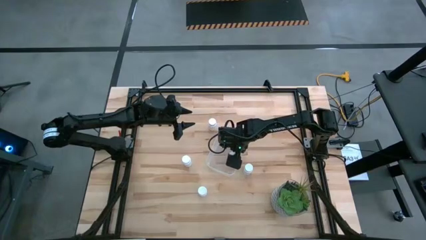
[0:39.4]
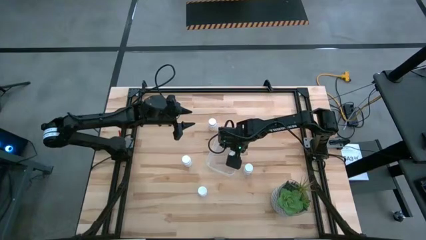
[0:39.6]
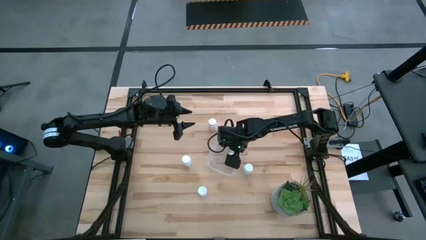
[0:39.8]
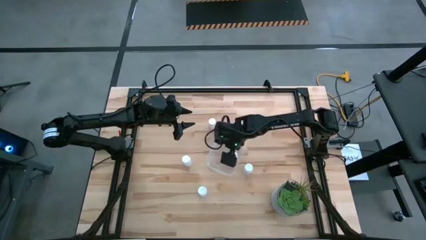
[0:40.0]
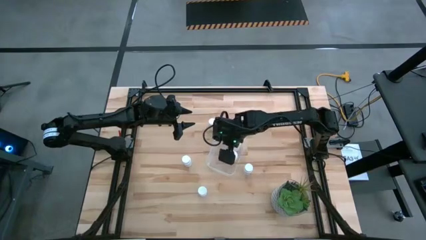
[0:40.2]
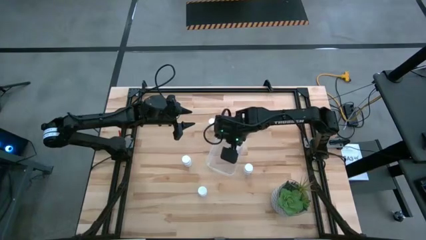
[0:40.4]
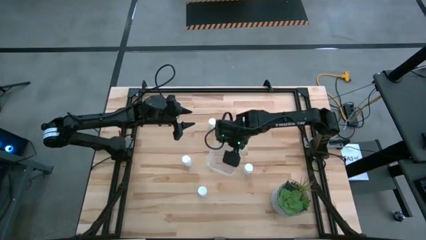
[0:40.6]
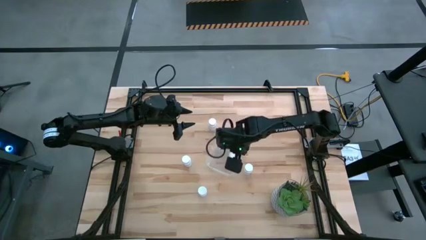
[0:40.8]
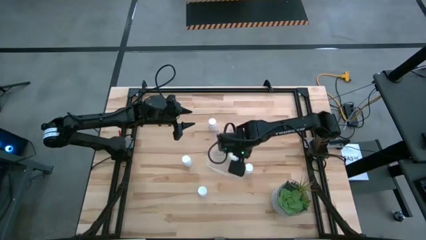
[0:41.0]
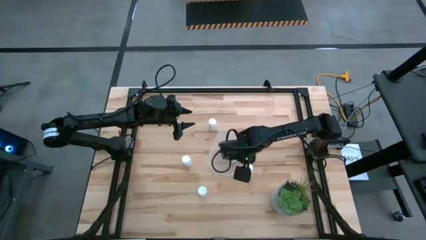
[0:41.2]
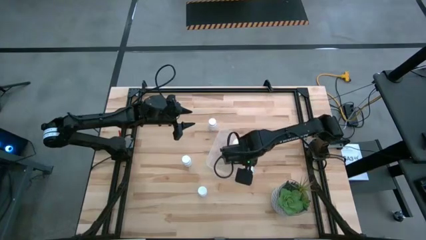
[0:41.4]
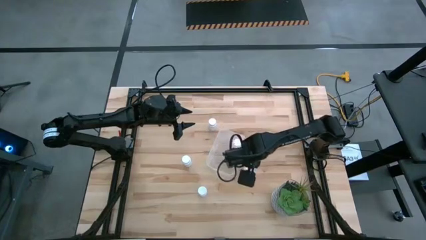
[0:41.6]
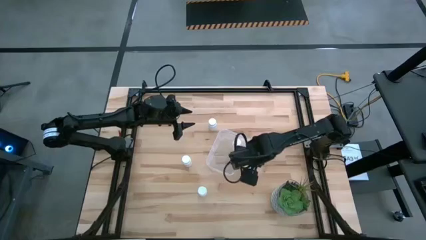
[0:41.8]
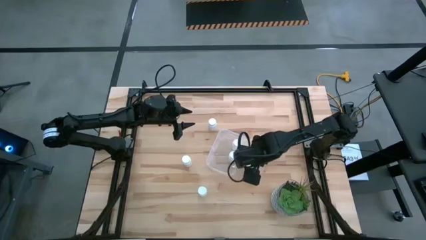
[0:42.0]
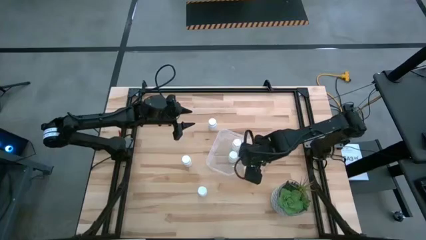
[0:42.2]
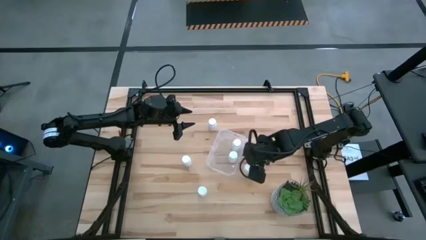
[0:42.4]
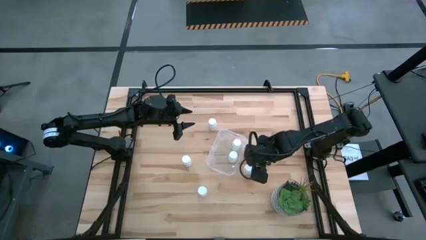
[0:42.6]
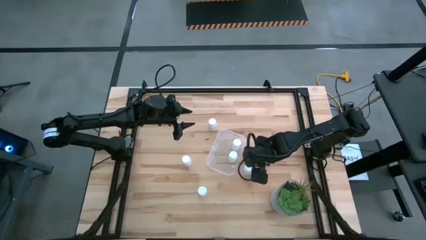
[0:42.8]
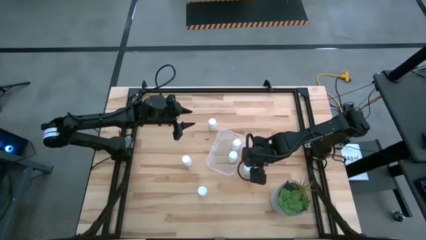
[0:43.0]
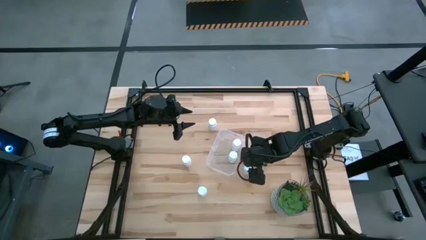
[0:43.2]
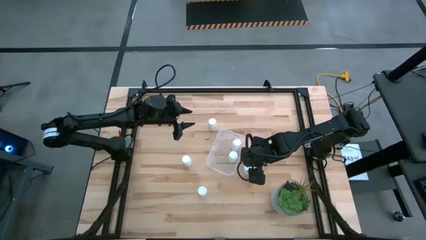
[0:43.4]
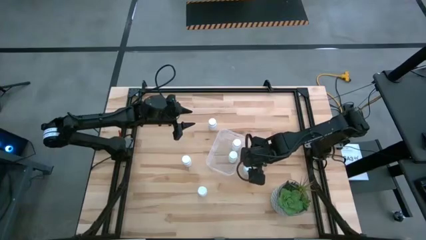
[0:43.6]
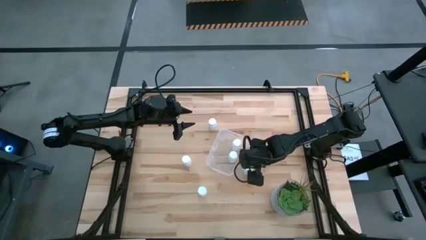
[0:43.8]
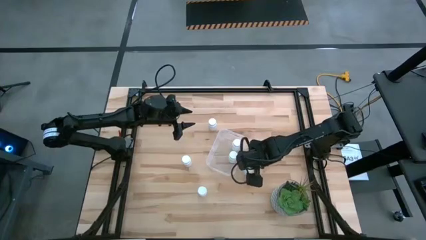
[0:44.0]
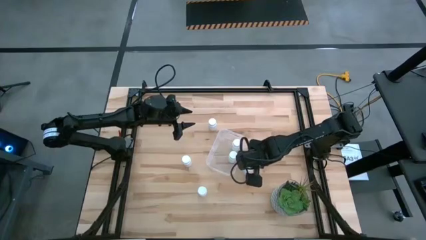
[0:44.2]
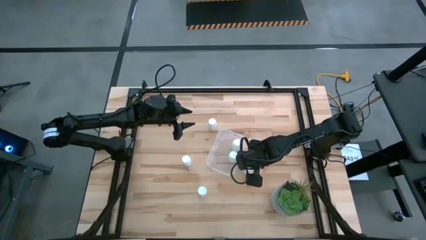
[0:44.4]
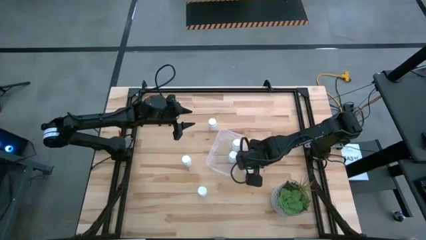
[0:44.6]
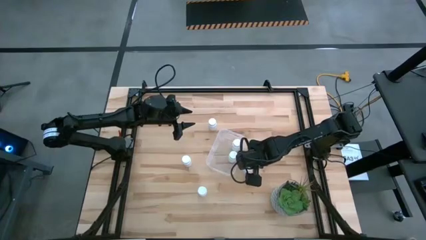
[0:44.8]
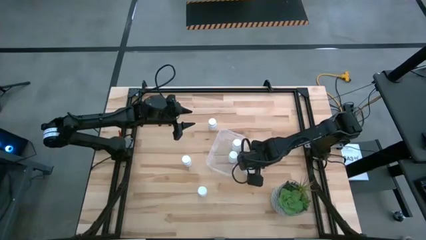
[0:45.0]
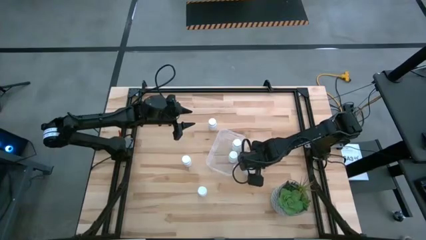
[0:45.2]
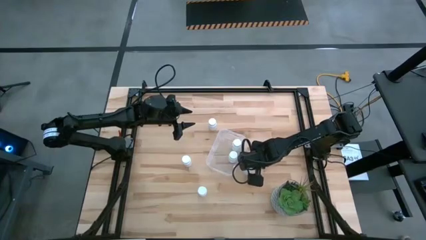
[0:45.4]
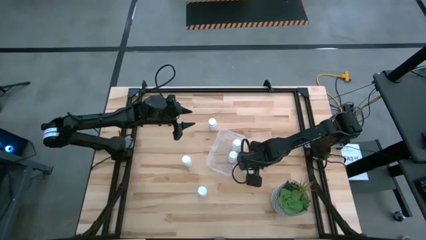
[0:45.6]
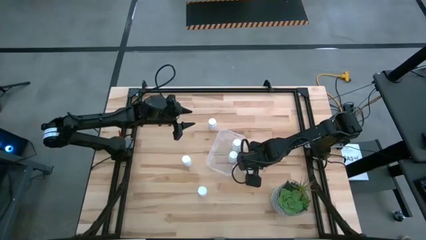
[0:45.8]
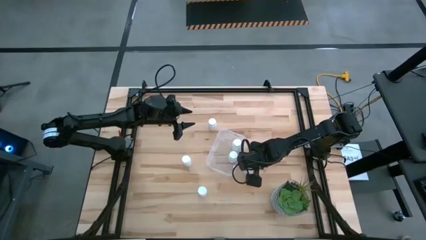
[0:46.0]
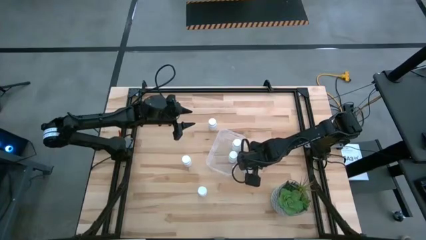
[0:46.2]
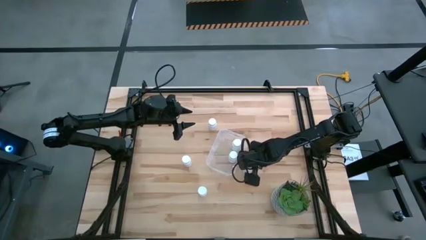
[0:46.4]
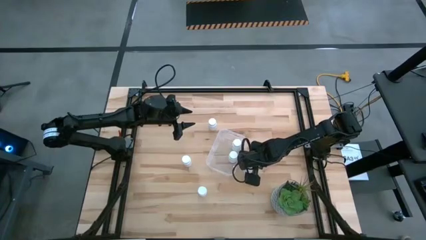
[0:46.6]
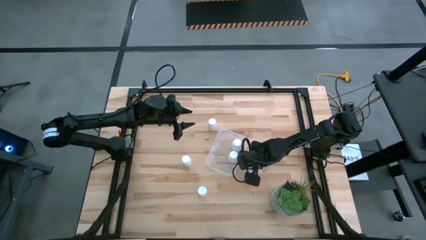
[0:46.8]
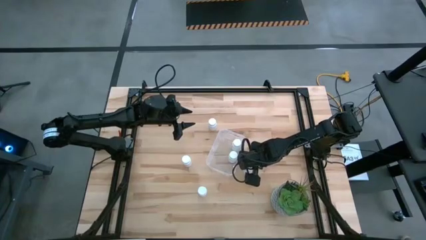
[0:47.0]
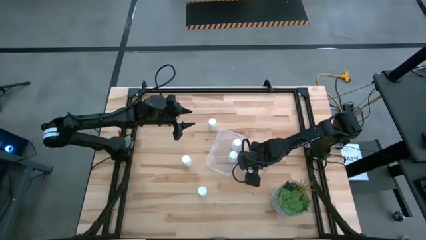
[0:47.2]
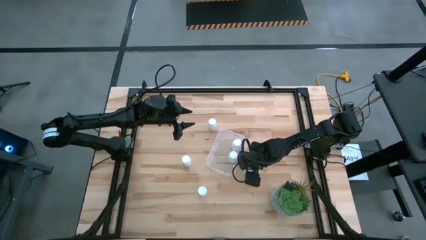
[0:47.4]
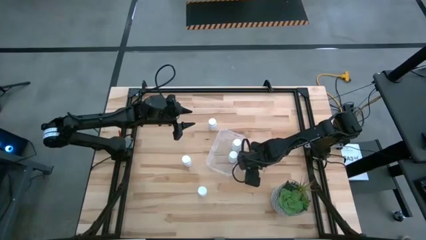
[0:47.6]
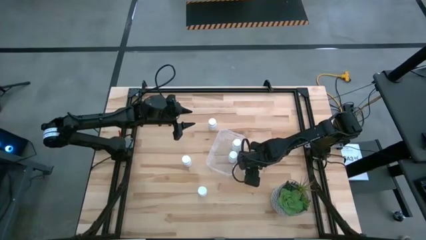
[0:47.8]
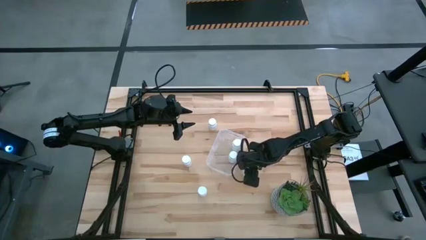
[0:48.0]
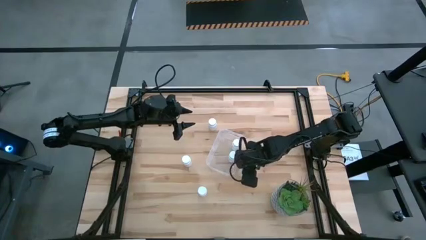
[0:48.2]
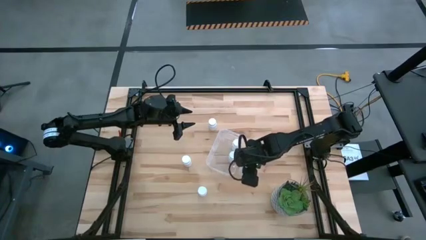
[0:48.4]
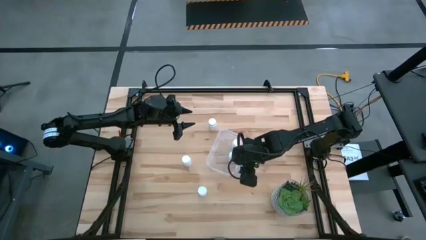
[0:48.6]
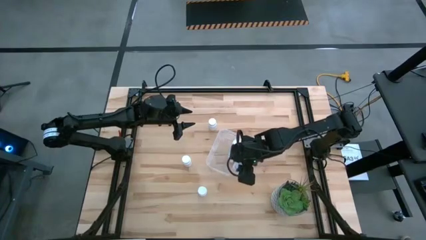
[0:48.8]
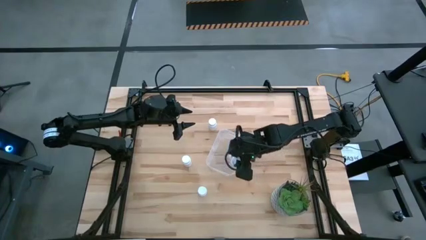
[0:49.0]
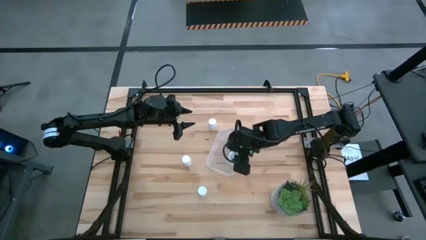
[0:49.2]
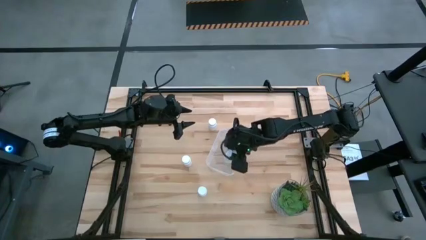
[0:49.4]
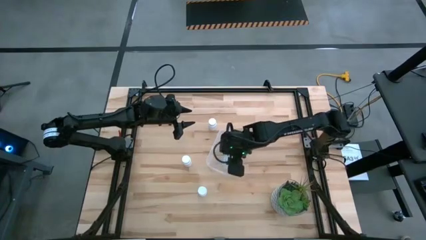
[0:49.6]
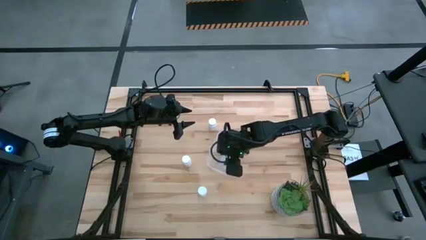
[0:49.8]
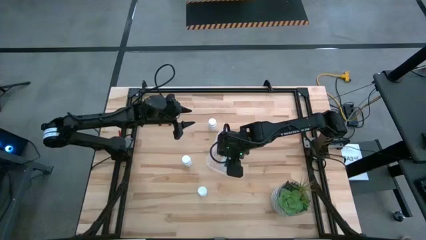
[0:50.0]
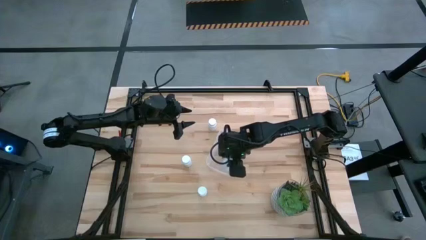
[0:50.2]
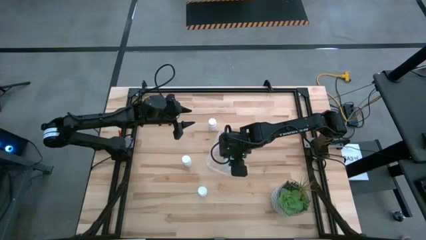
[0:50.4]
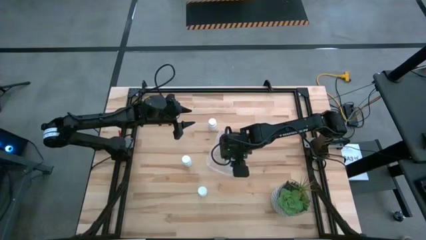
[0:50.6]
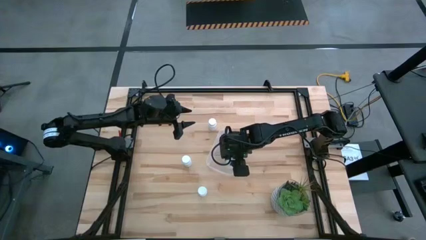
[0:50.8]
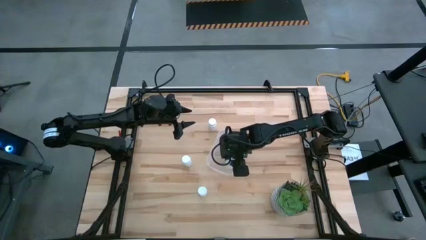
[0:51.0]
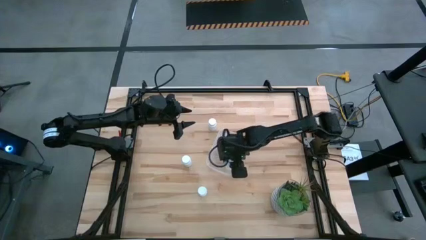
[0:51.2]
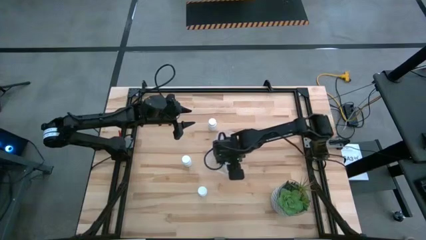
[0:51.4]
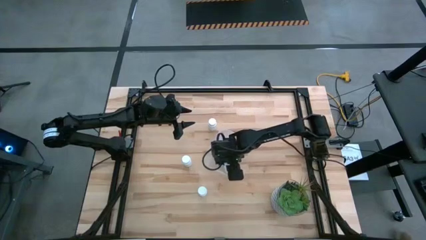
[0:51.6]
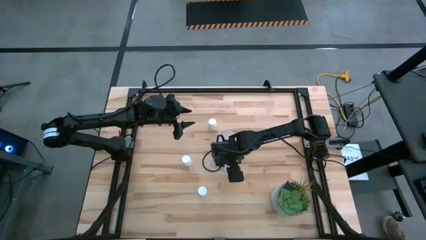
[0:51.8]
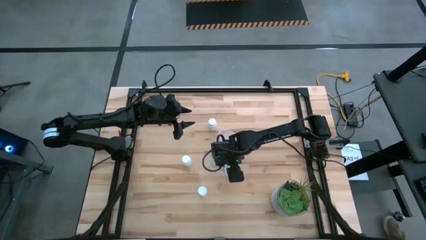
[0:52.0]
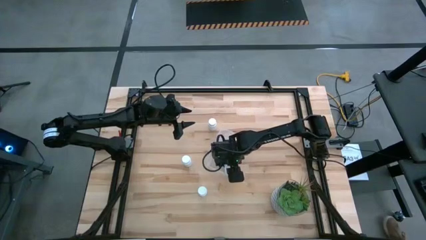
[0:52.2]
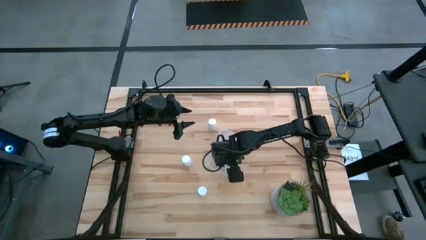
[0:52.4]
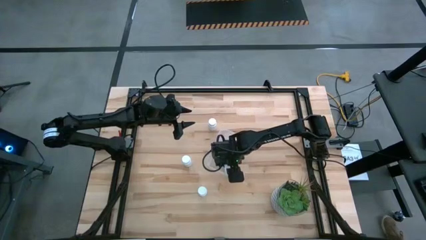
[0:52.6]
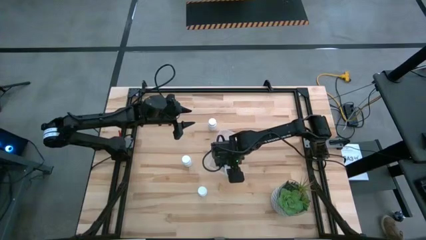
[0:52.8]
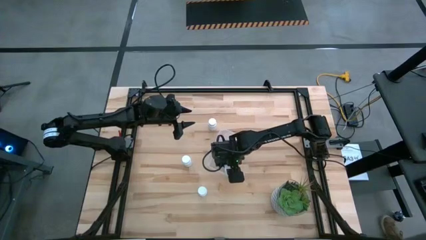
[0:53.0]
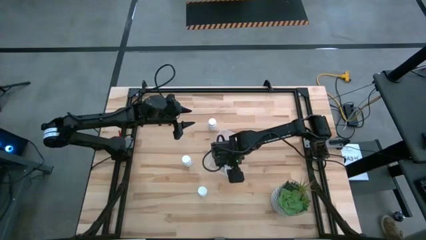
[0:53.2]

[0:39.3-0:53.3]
Task: Pick and place pill bottles into a basket
Put the medicine bottle into the transparent bin

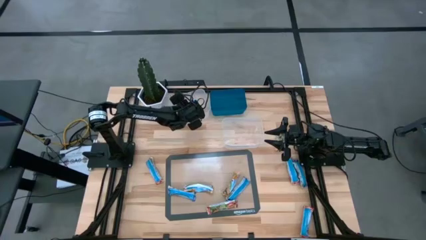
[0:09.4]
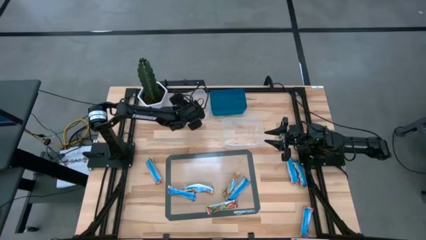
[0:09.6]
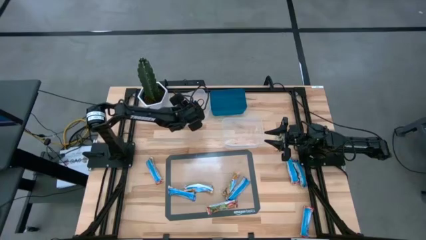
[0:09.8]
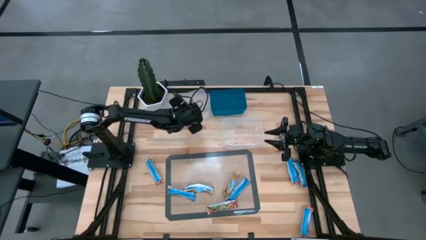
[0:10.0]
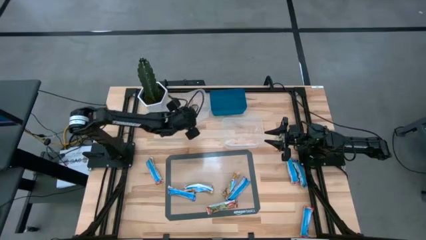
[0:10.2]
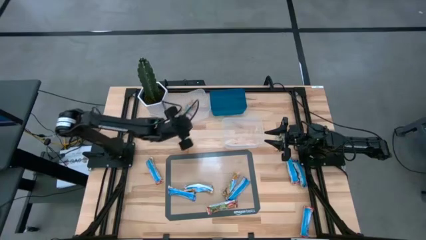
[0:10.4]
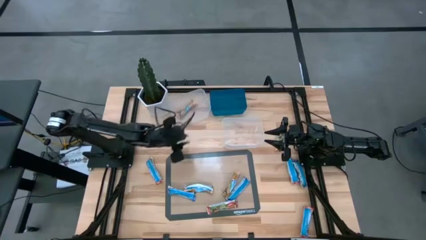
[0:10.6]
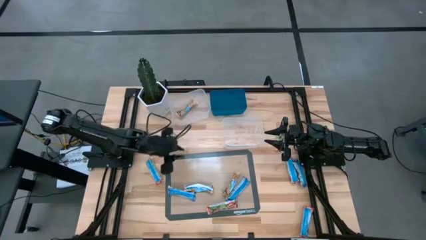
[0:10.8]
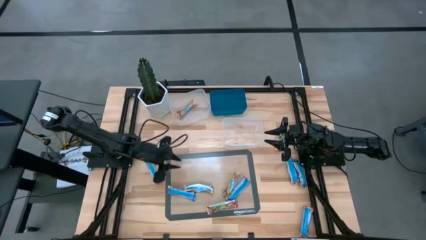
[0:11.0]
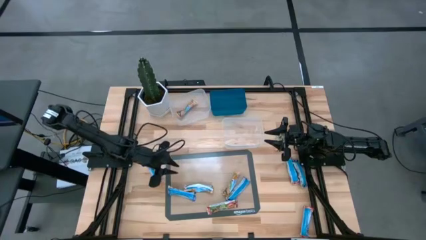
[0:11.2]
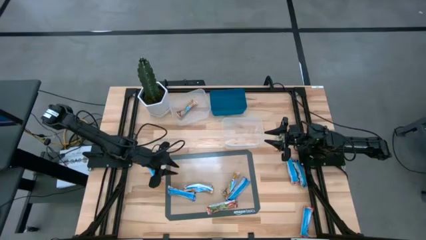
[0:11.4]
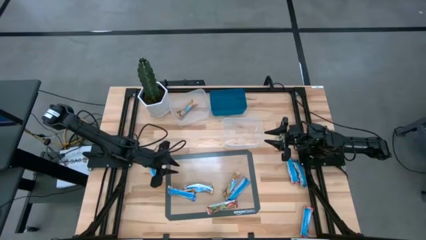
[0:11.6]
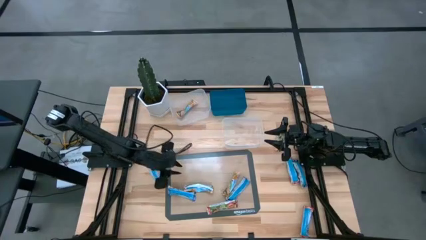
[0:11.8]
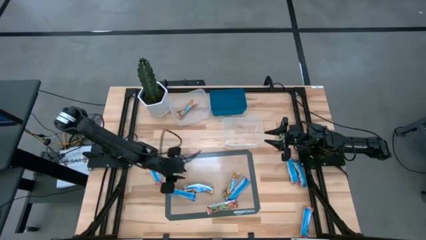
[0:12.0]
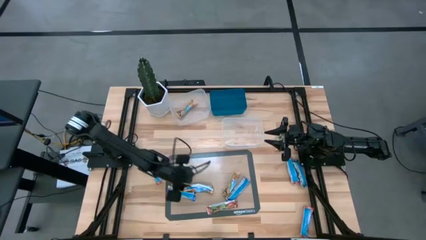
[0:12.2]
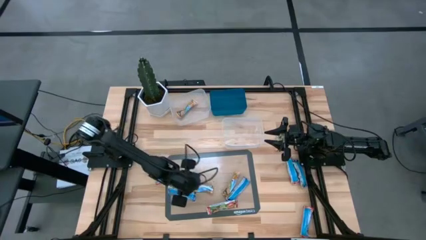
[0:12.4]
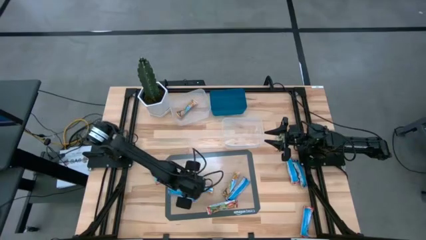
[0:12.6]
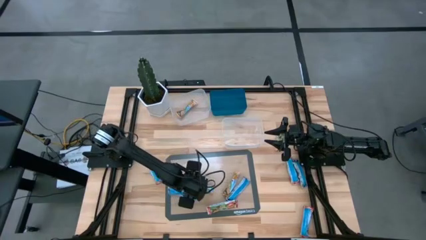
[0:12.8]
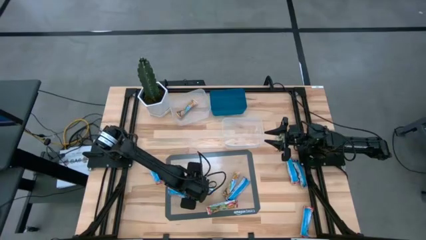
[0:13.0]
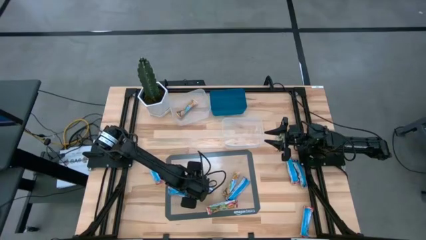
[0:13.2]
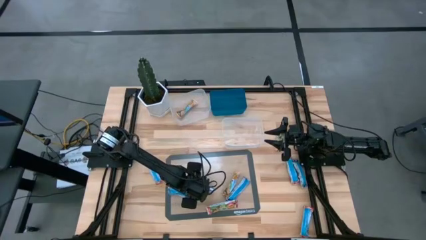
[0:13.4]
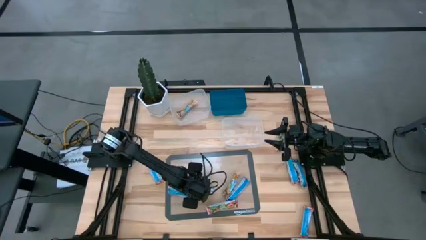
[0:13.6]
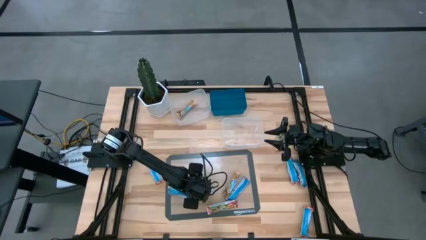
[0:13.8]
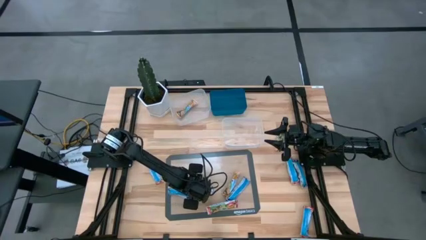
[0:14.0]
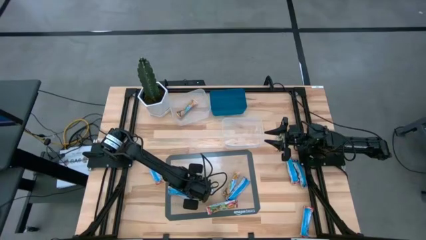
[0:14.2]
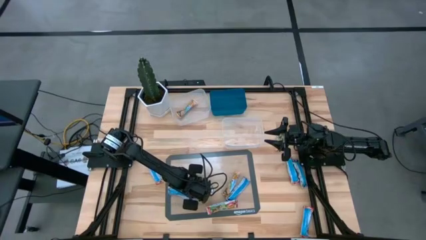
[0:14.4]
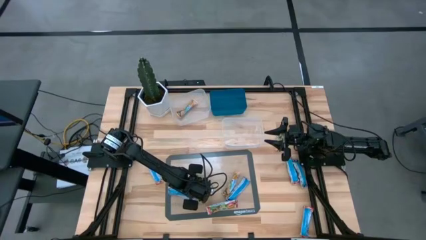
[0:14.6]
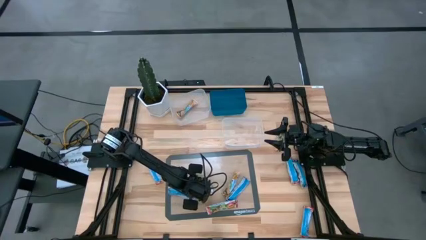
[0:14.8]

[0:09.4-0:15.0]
Task: Pick and place Granola Bars by type
Put the yellow granola bar into the top transparent bin
